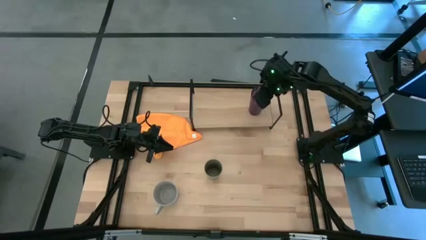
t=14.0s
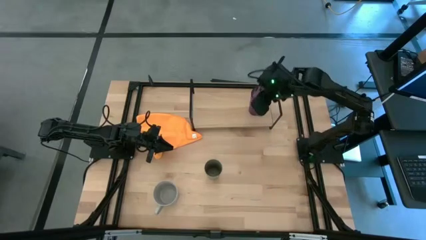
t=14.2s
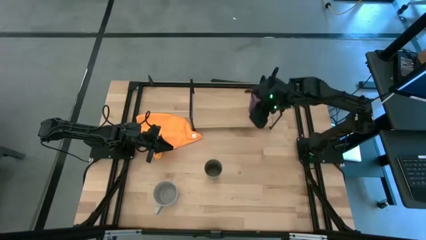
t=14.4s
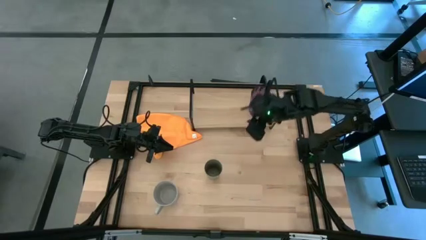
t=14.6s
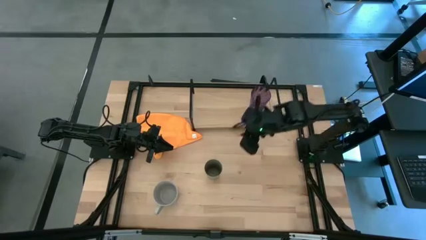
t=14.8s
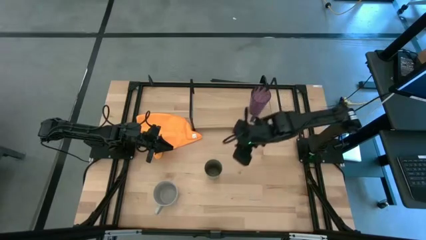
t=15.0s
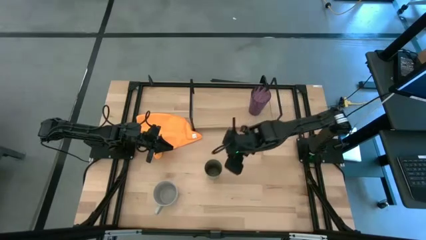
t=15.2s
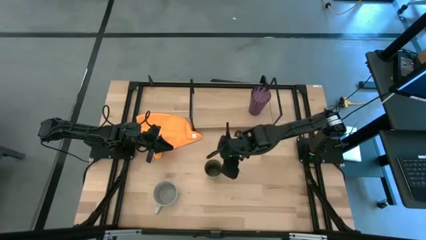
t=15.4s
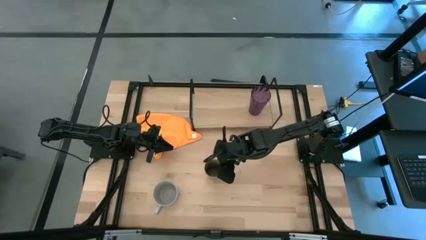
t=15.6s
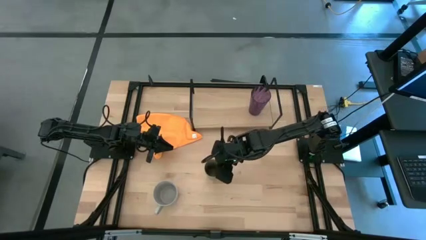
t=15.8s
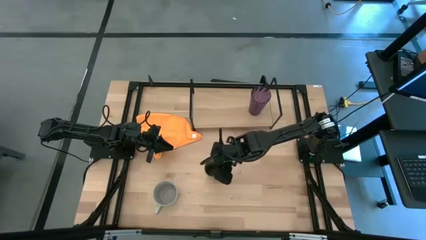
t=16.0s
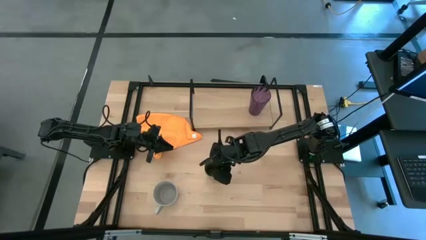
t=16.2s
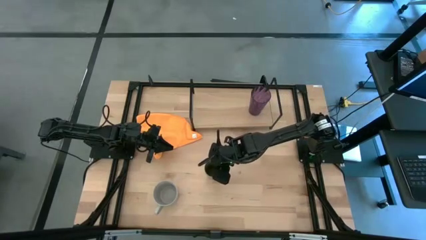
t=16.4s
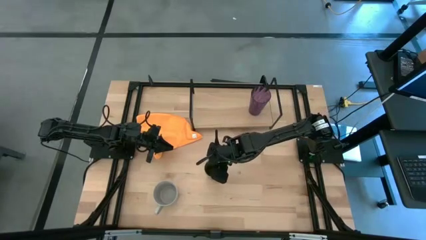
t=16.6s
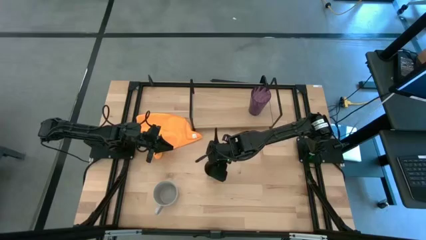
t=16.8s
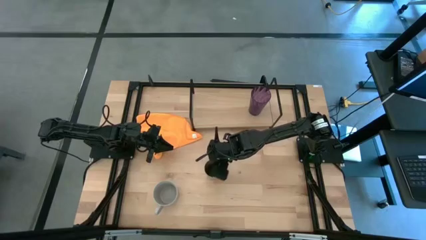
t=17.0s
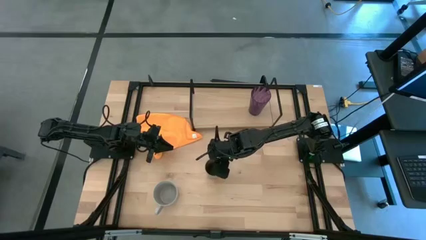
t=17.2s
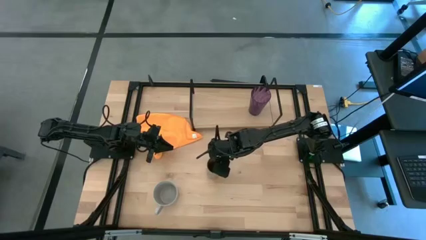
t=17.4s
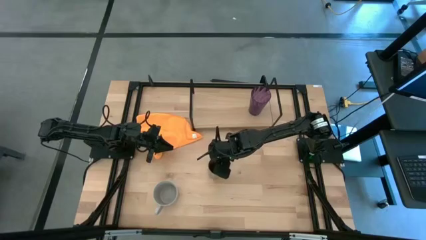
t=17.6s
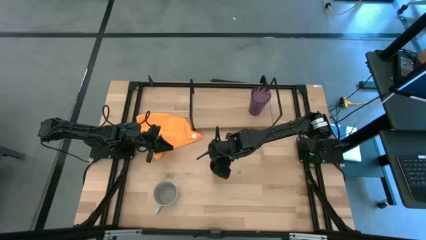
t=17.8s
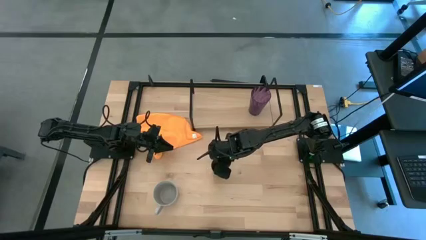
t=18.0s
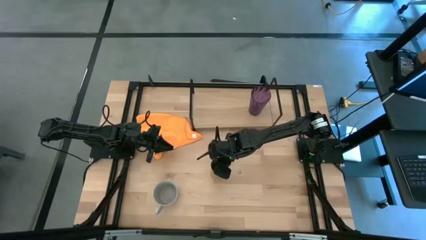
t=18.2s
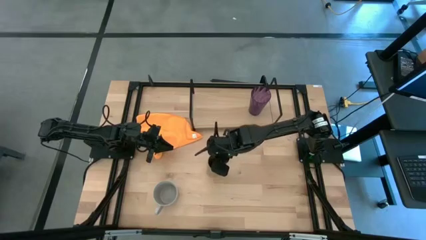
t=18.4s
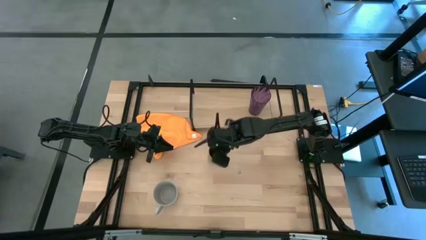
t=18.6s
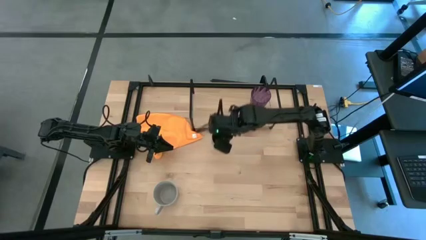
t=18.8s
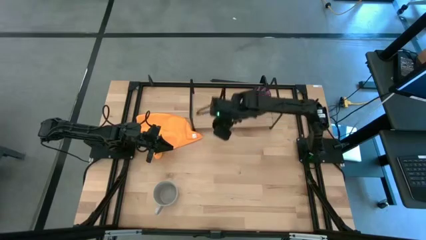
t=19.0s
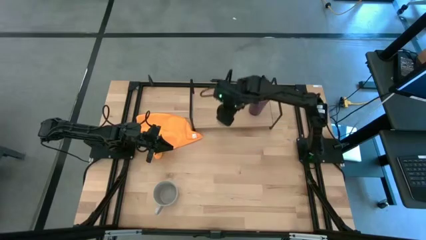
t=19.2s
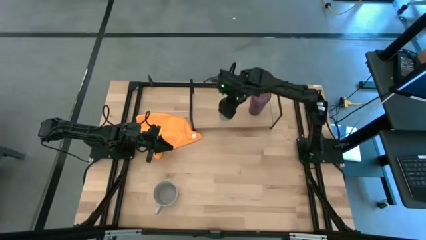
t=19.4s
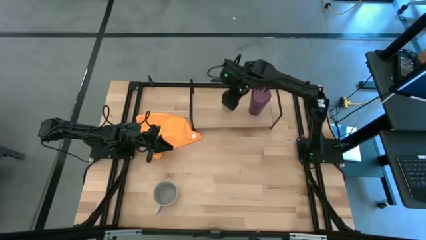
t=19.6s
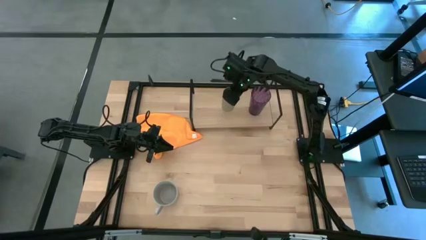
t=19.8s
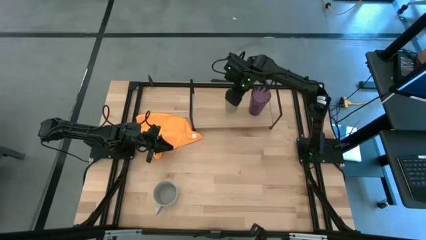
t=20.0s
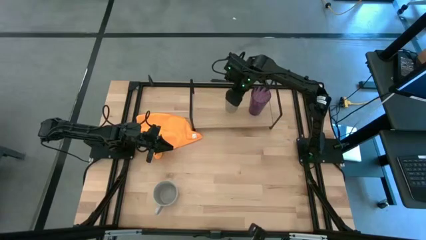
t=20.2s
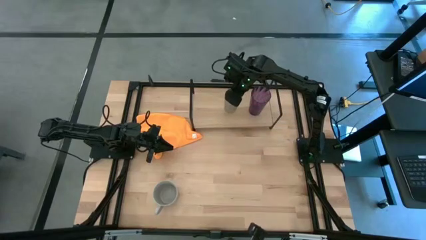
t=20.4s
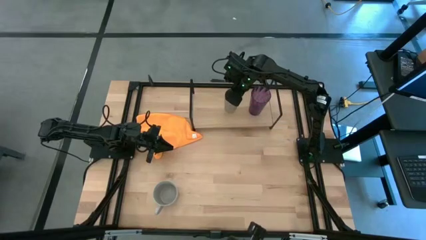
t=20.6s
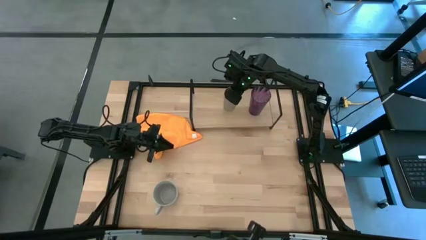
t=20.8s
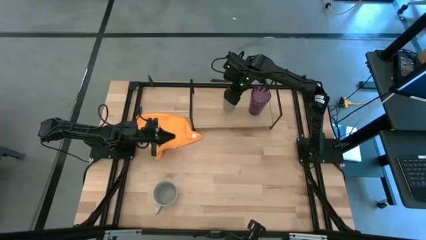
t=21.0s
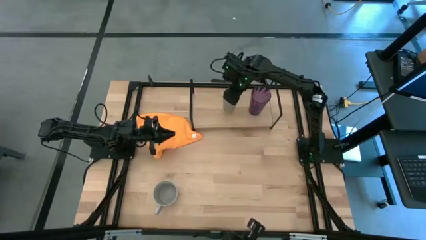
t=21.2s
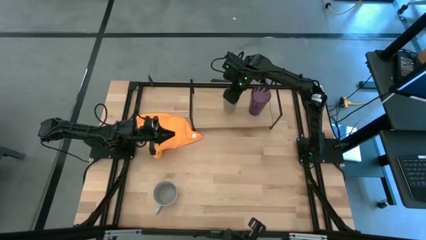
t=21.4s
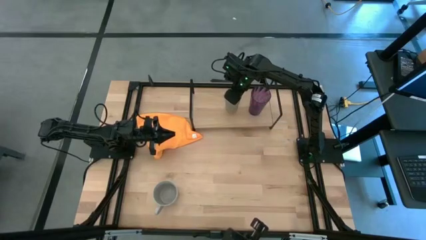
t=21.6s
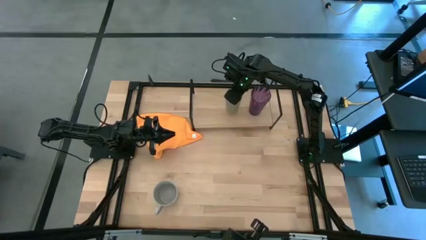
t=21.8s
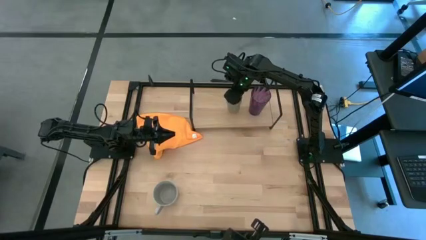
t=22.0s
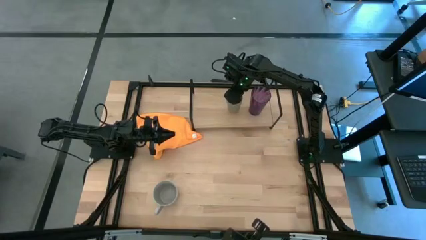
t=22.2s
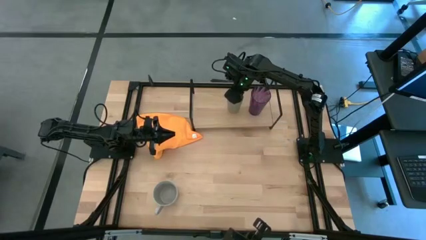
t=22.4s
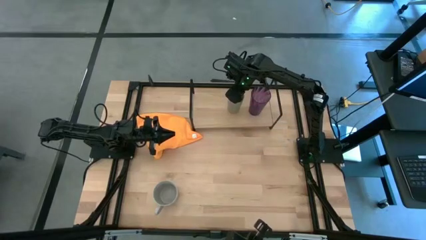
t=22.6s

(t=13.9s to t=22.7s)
Task: Stack small to large cups/mugs on shelf
Put the green cup on the shelf

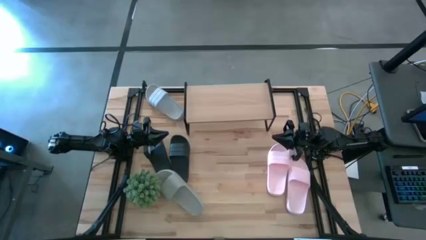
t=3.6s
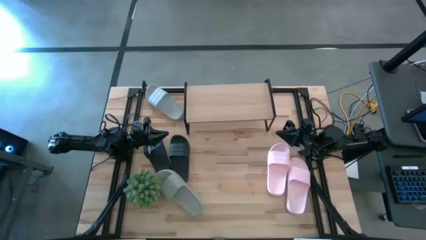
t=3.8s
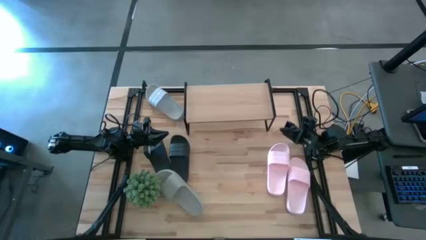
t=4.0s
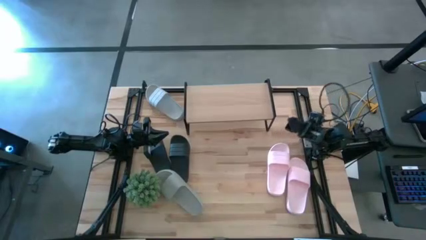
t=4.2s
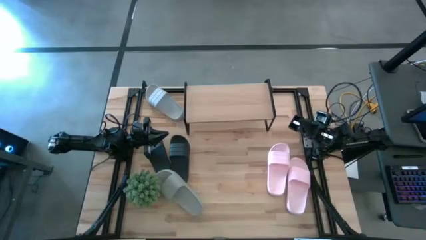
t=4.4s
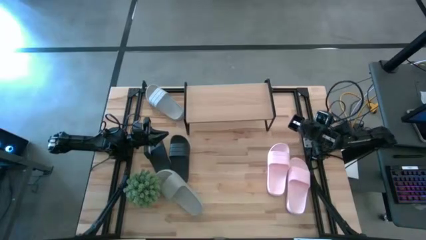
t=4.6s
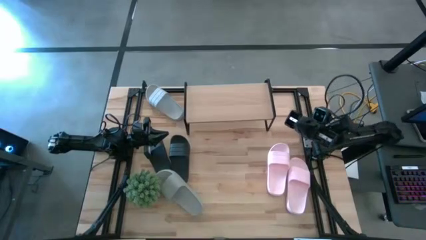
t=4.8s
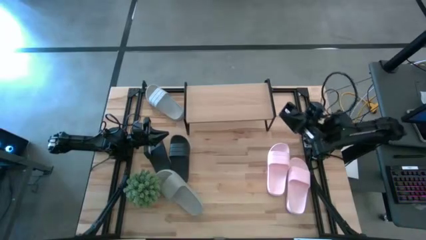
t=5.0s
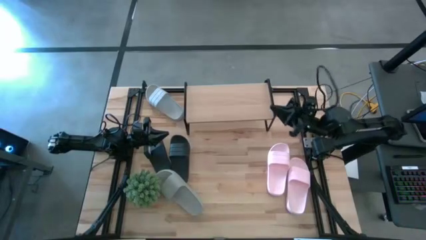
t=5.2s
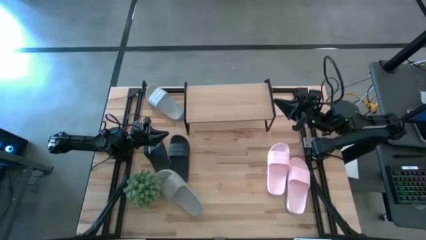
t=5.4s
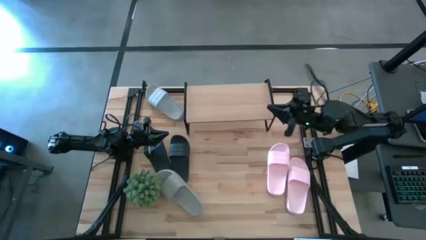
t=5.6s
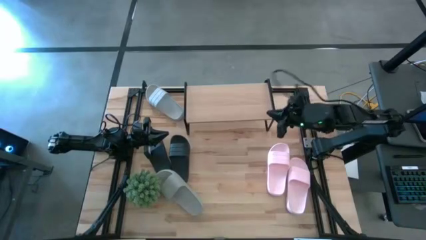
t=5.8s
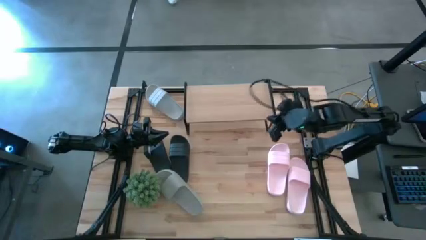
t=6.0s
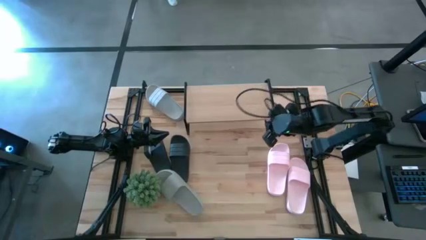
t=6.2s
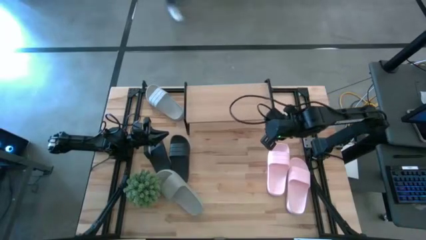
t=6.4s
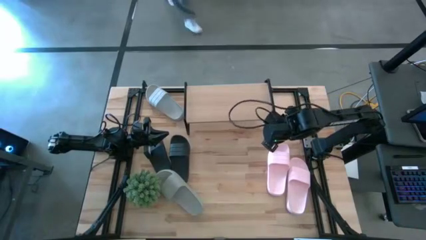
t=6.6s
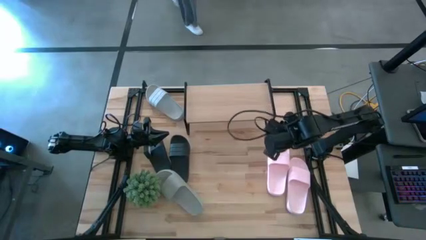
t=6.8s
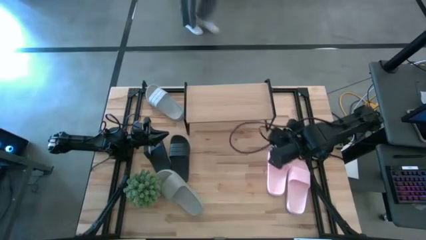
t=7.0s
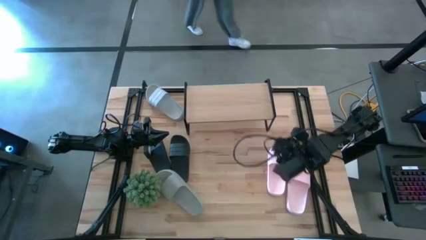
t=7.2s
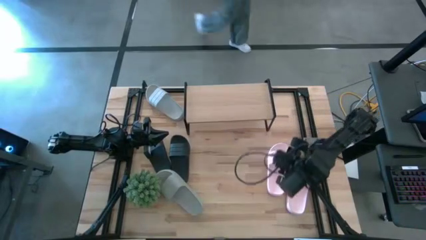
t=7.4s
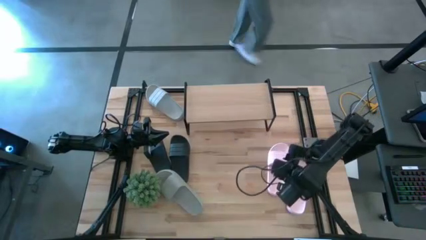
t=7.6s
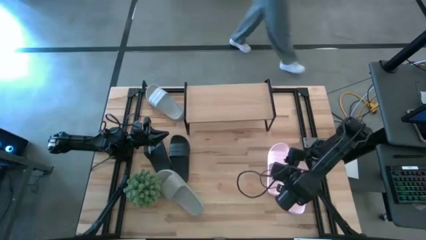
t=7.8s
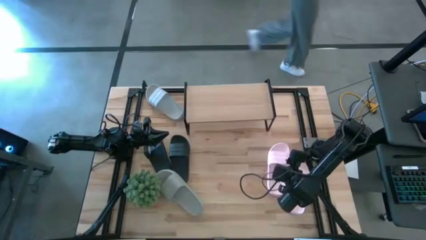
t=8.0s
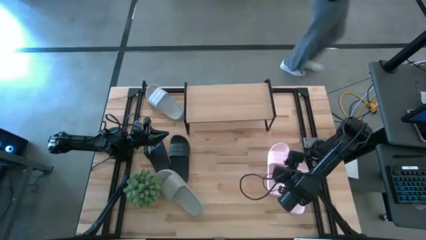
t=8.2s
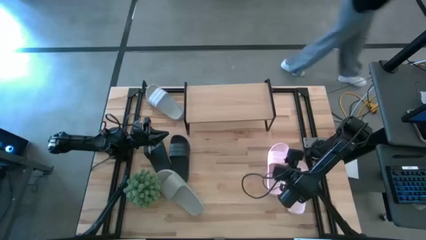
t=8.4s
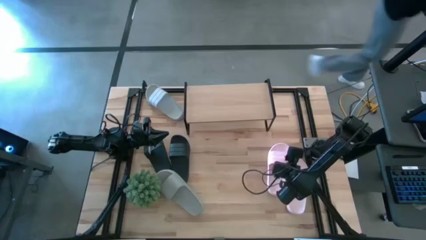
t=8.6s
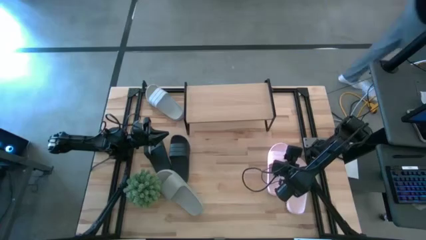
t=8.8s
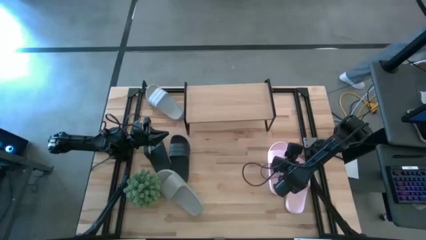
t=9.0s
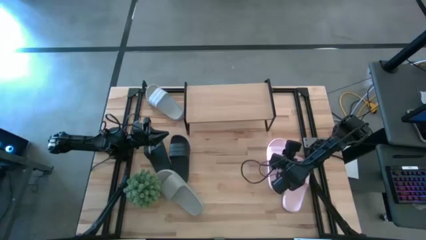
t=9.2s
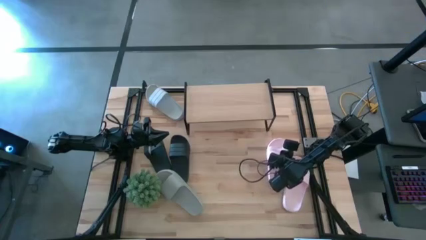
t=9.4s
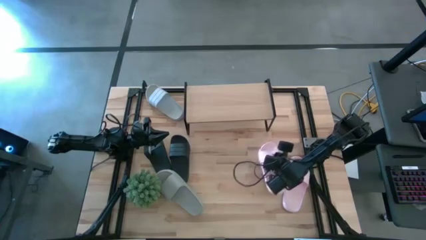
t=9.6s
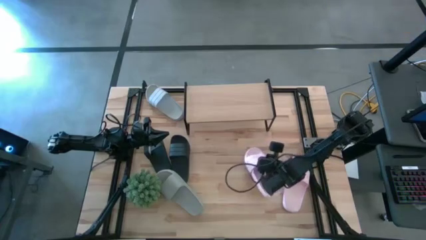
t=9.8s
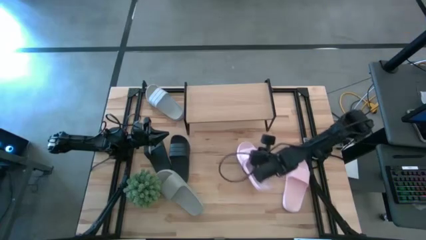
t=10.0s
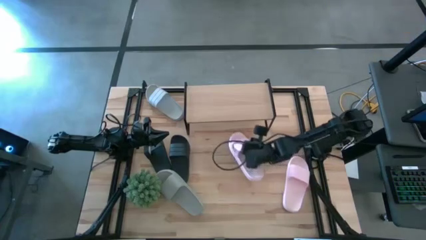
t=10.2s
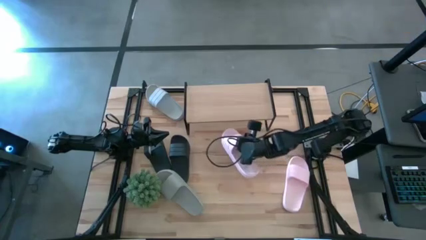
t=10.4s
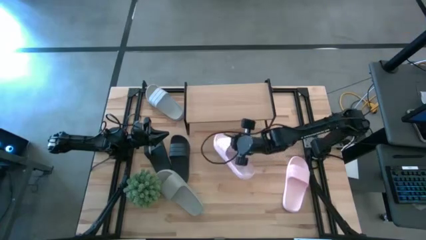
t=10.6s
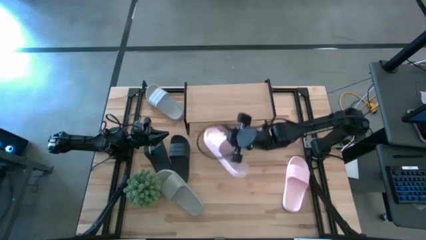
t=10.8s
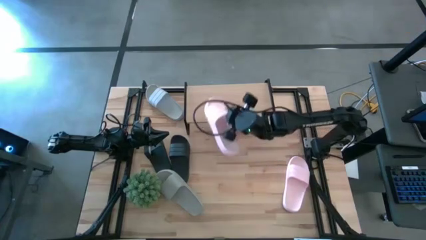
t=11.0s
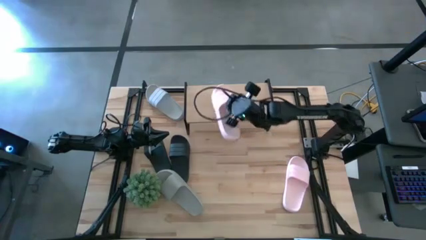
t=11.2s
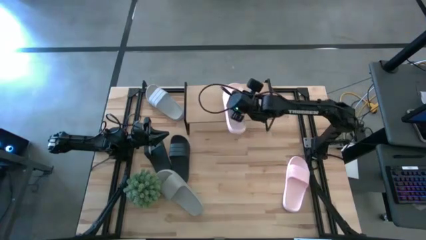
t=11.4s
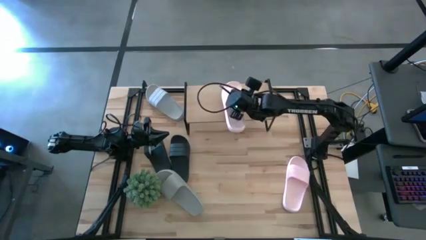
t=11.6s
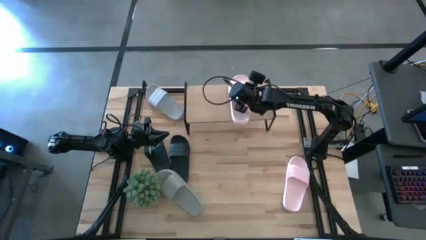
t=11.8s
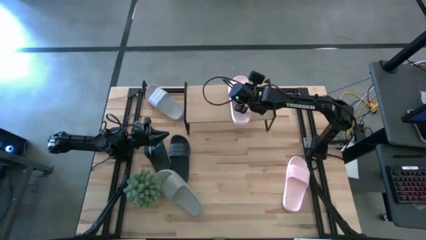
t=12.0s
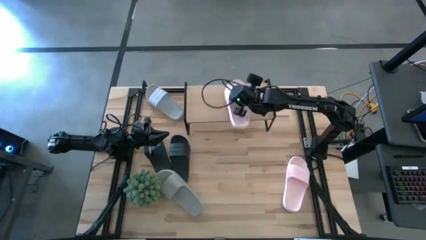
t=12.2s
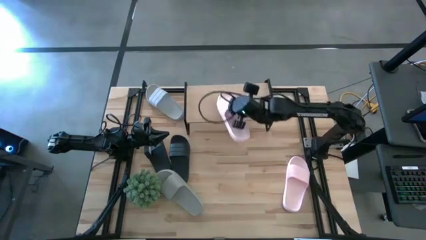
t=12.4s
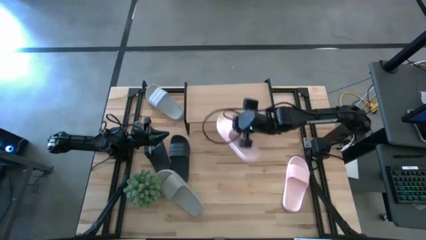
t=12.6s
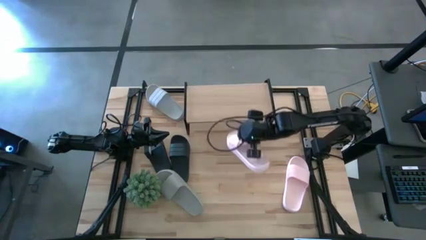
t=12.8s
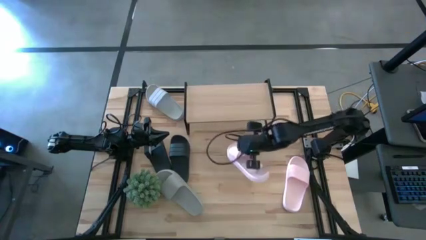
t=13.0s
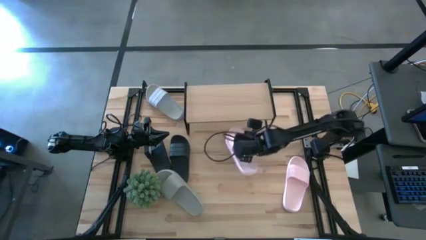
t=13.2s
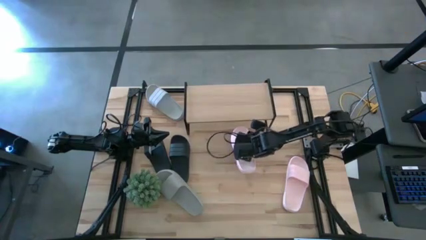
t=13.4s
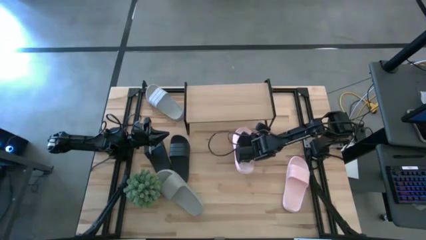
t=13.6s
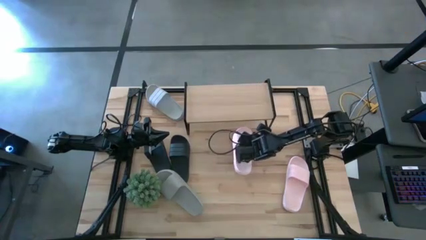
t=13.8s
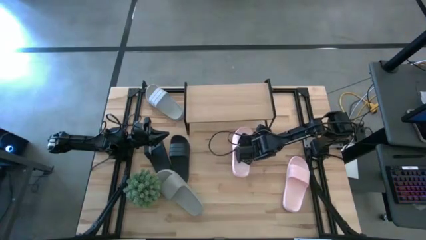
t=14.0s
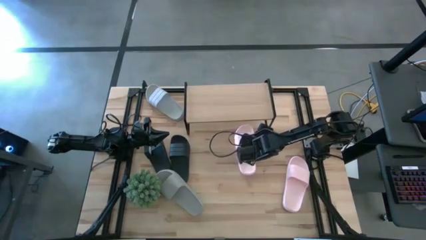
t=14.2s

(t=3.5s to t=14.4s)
Task: Pick and place slides into the shelf
Put the left pink slide under the shelf
